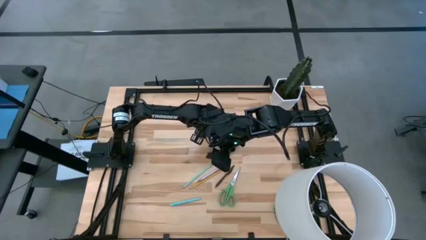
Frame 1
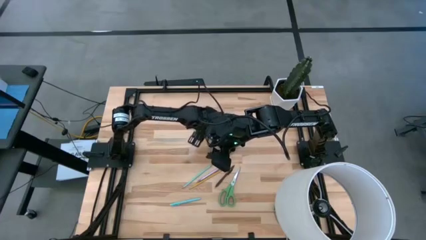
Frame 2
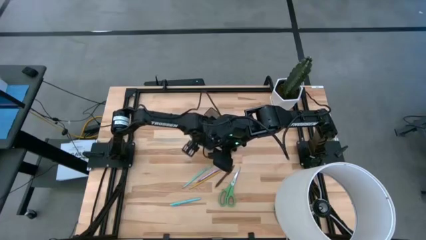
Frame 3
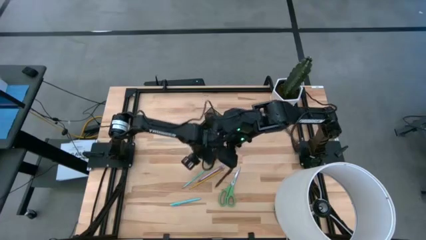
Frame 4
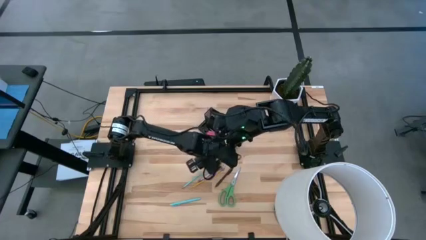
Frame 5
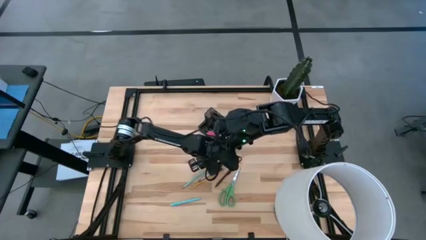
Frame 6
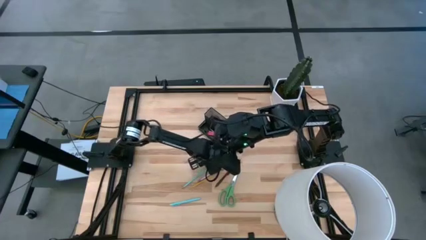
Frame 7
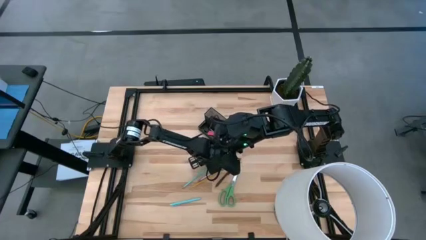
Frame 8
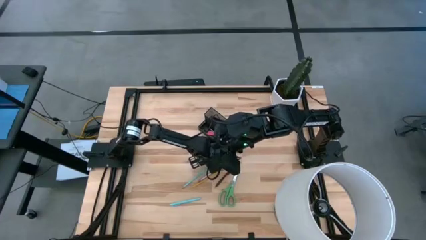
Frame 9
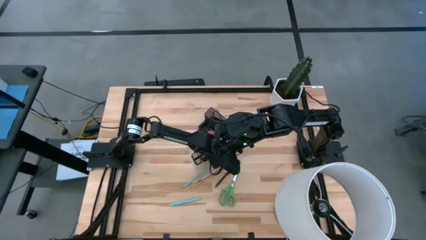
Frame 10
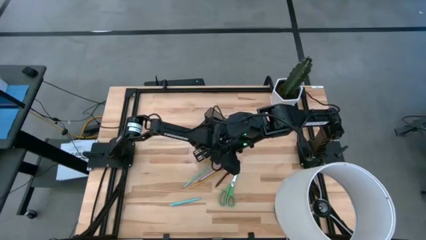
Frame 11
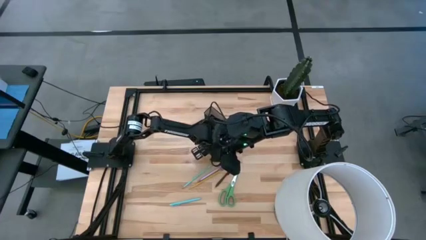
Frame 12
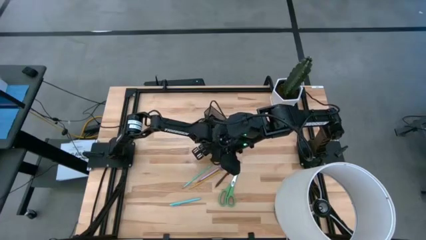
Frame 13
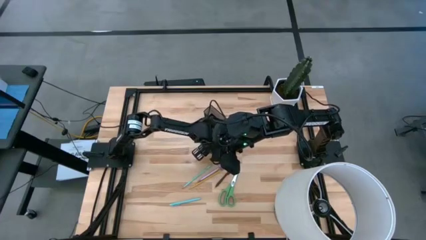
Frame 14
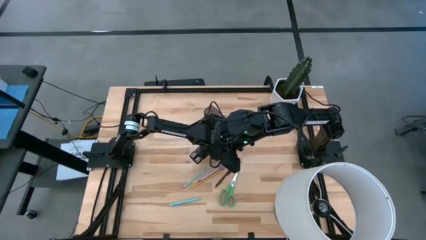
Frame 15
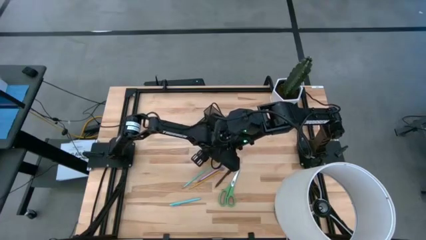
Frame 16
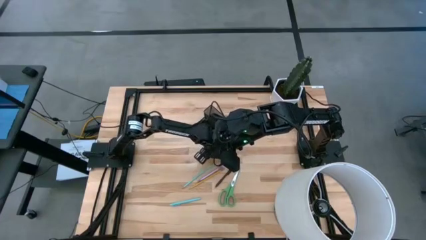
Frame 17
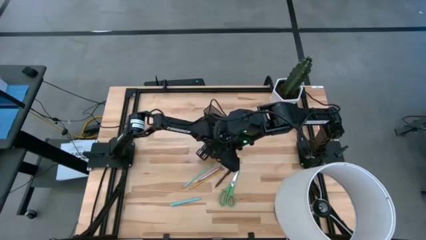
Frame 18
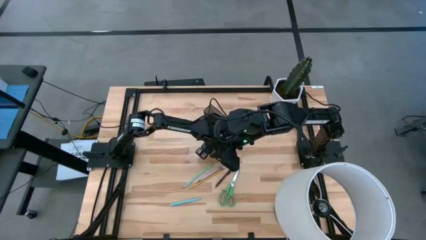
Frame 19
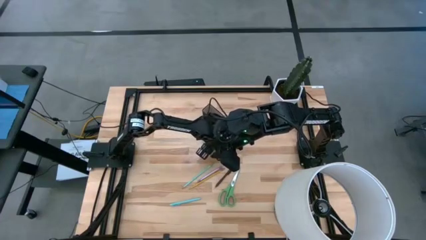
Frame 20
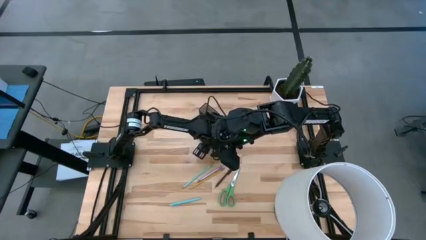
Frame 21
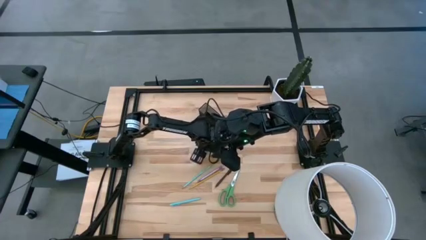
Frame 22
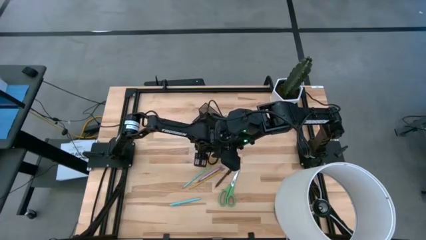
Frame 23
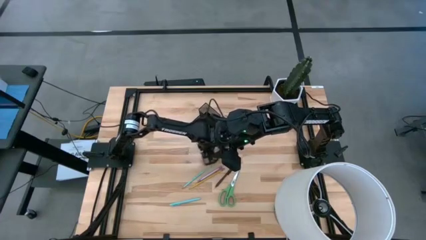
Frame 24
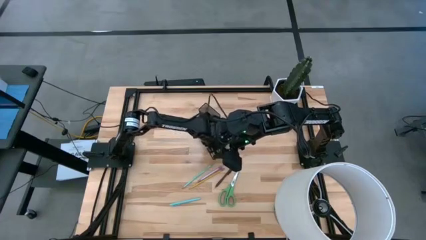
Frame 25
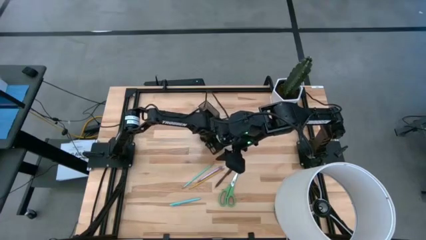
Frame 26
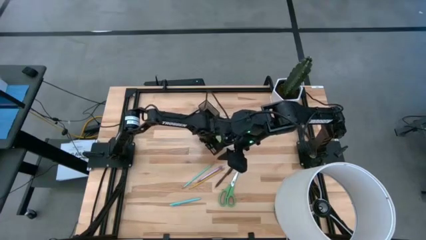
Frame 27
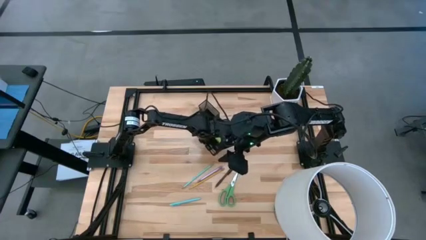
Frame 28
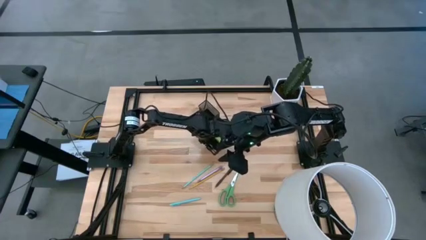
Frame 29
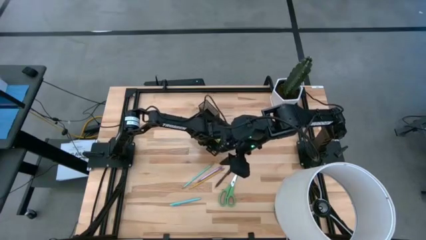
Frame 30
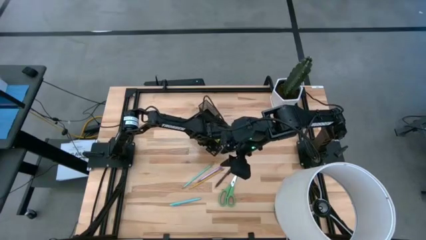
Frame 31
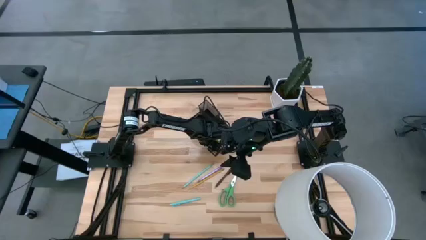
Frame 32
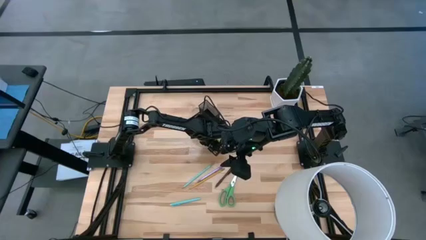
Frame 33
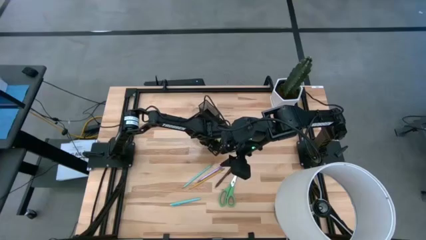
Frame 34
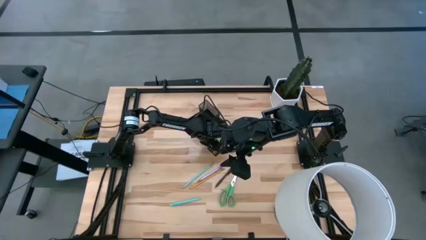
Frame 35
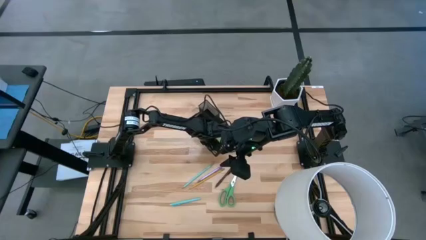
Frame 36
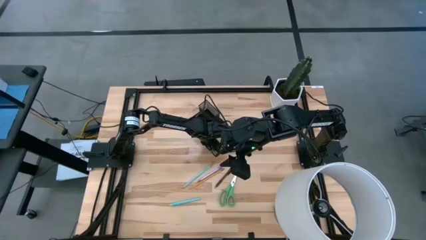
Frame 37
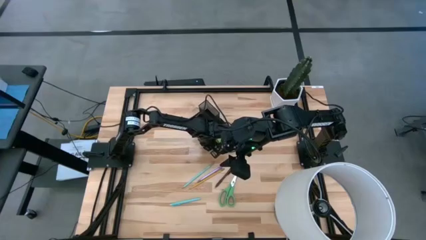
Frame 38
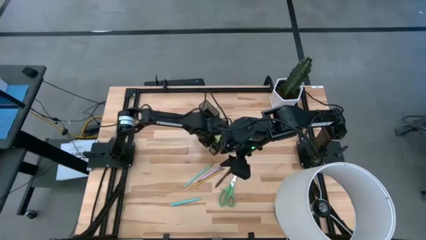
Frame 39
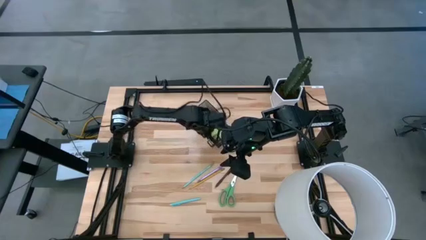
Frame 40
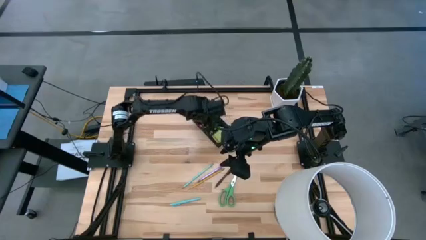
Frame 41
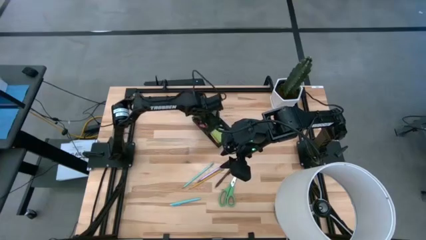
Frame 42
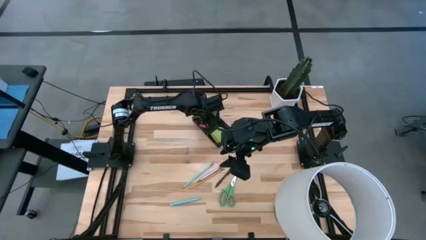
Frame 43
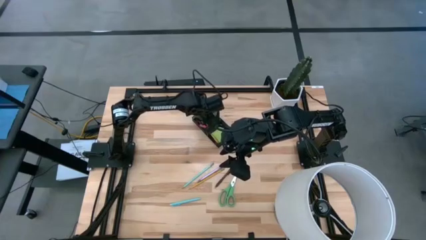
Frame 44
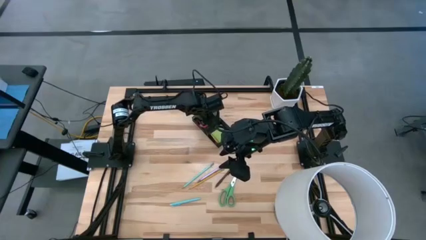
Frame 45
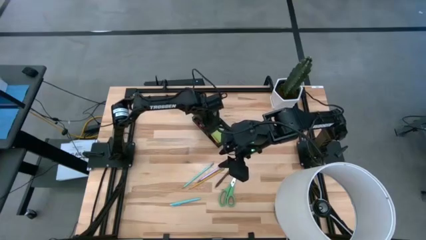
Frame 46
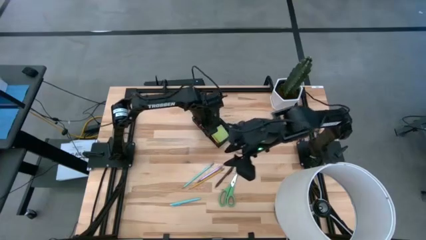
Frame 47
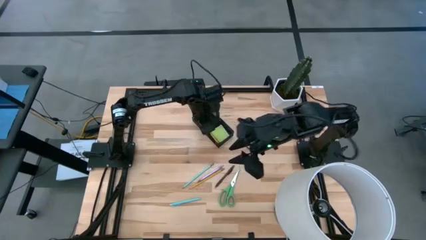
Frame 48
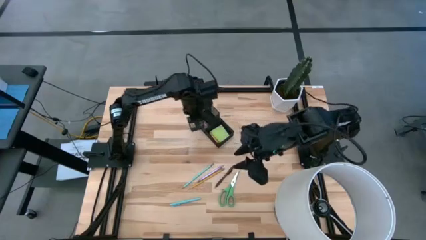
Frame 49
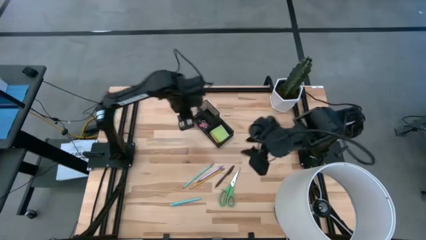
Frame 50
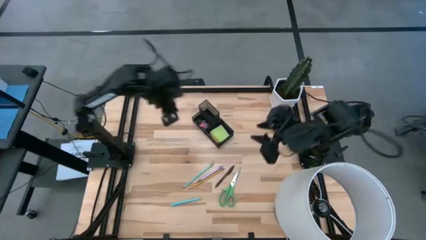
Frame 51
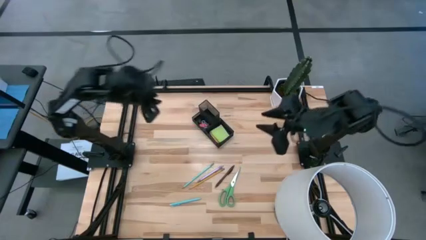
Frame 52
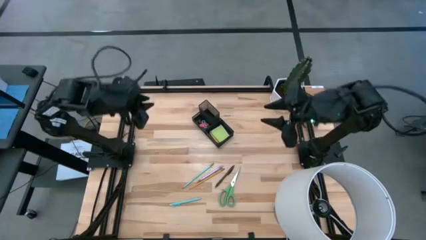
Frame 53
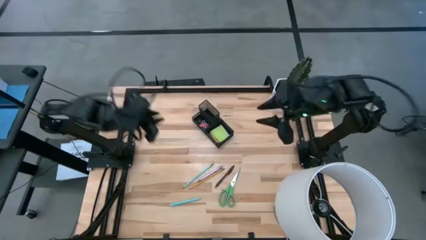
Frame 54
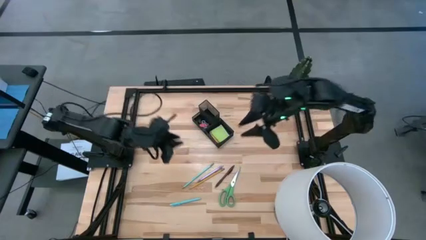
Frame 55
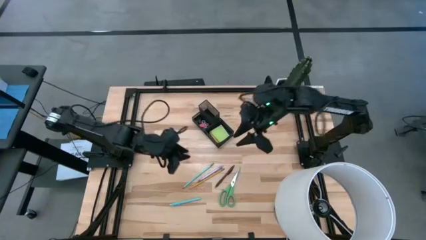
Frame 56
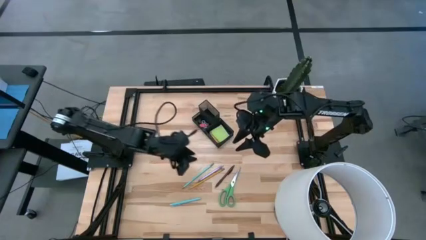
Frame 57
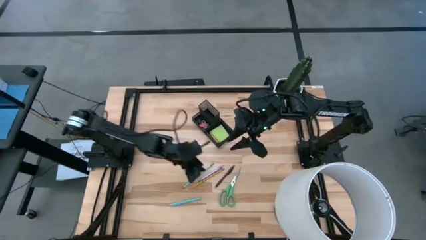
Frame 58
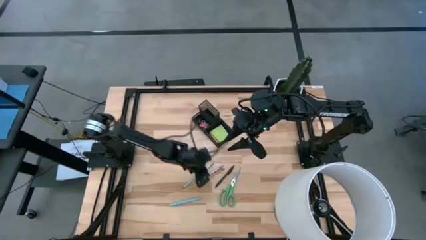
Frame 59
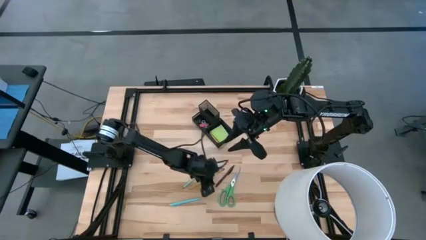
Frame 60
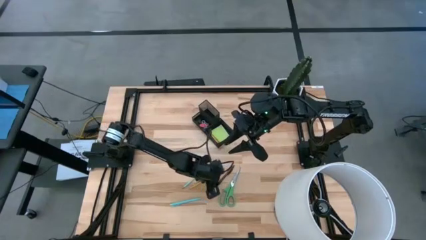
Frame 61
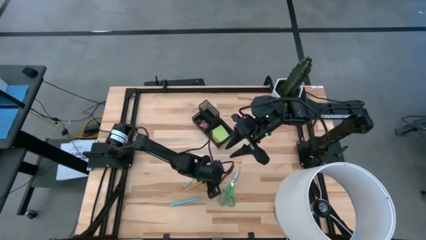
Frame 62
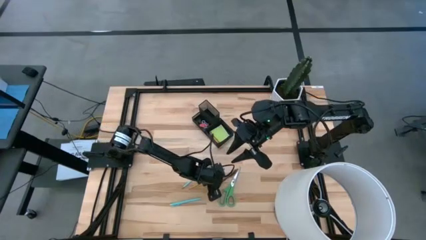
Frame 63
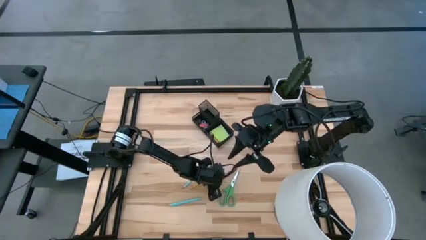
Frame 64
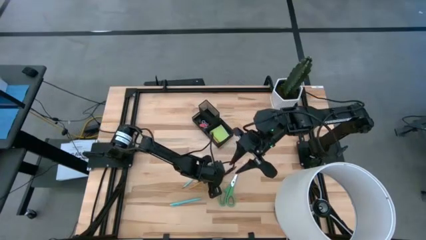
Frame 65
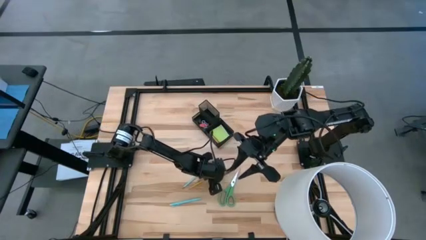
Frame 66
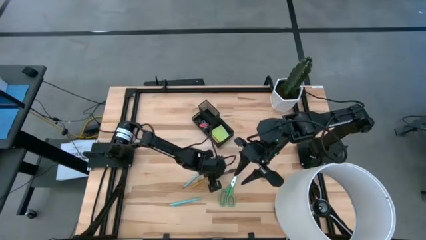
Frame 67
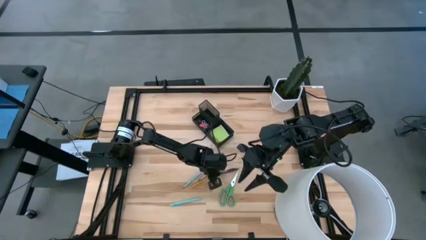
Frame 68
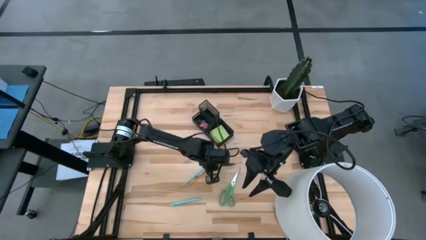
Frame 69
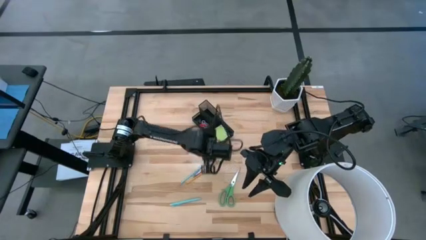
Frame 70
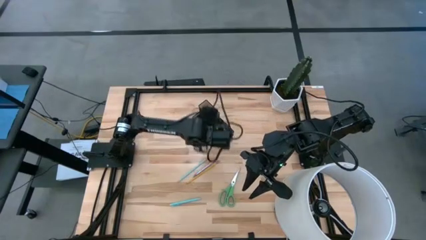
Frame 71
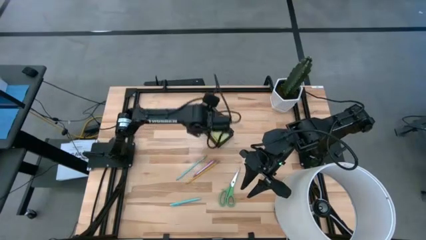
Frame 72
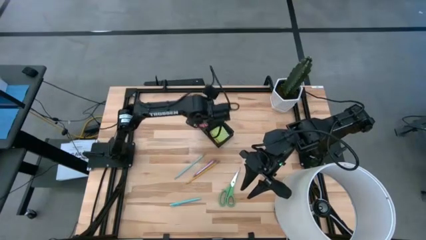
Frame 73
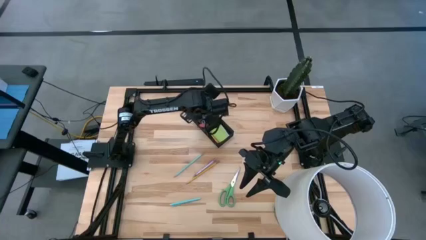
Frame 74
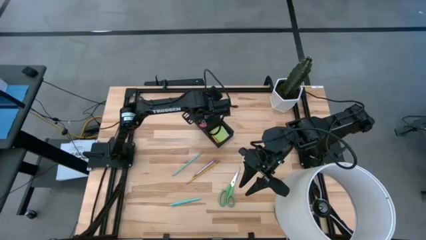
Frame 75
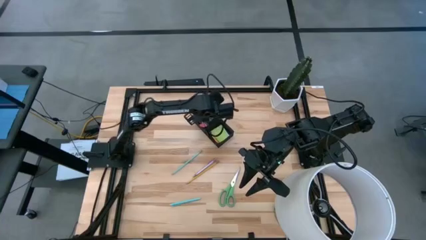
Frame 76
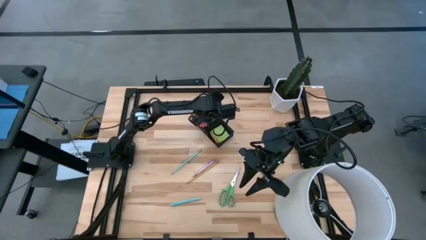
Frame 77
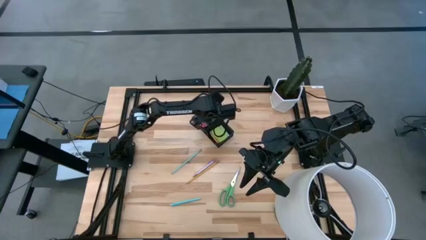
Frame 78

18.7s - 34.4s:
Task: Pick and place office supplies into organizer
Put the black binder clip into the black desk organizer
